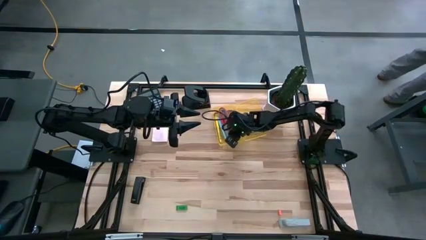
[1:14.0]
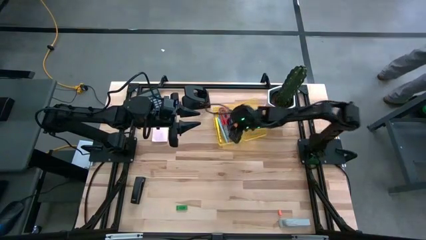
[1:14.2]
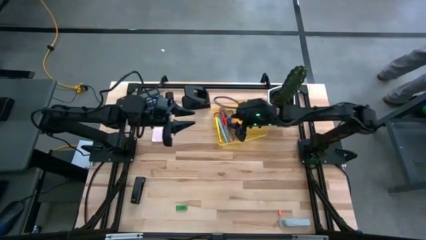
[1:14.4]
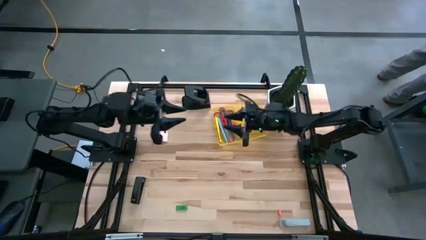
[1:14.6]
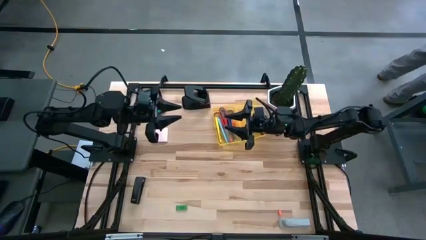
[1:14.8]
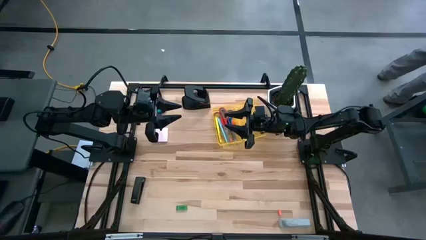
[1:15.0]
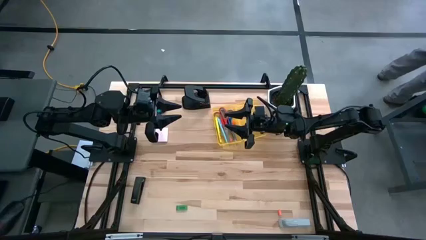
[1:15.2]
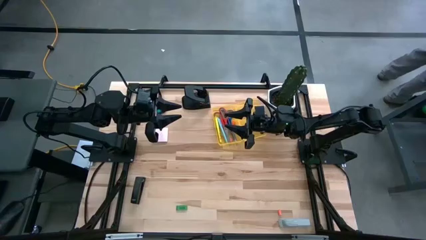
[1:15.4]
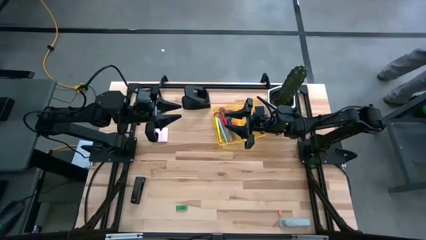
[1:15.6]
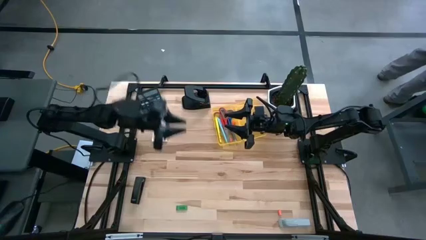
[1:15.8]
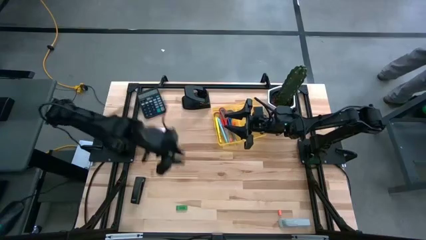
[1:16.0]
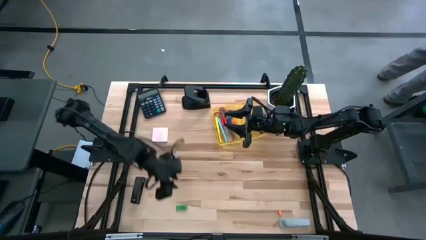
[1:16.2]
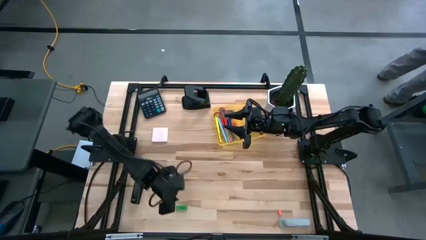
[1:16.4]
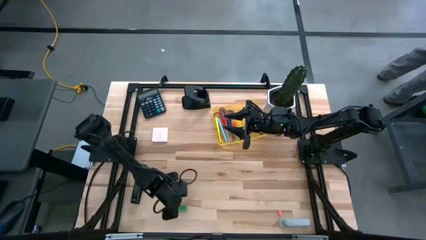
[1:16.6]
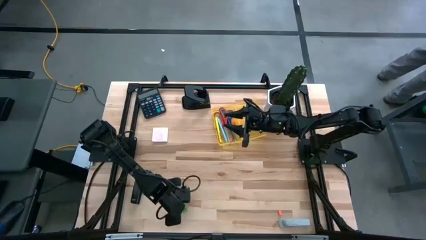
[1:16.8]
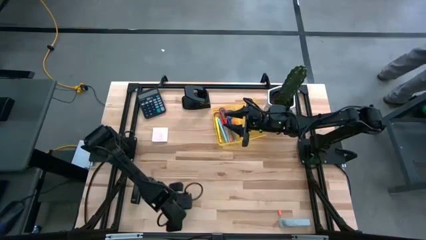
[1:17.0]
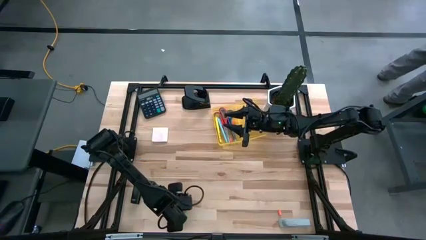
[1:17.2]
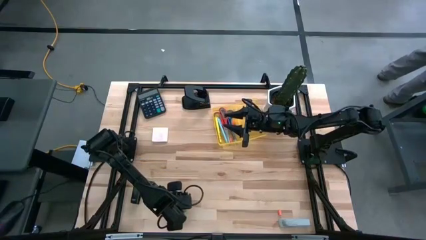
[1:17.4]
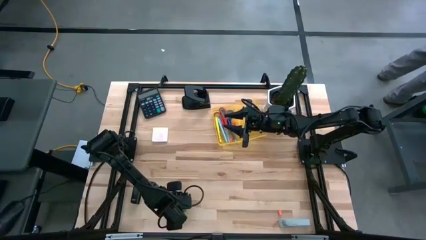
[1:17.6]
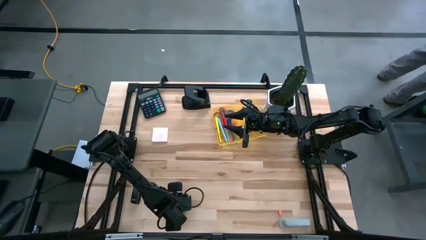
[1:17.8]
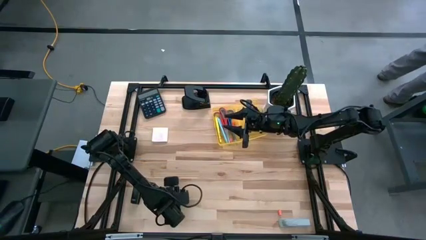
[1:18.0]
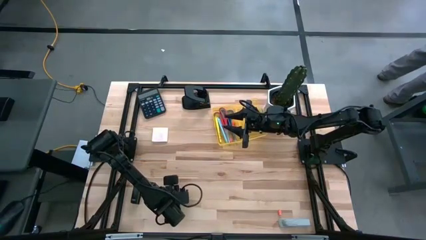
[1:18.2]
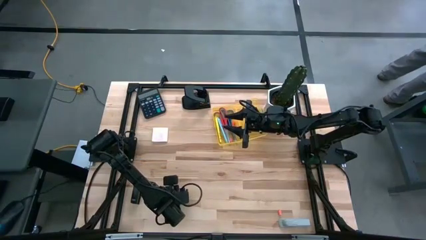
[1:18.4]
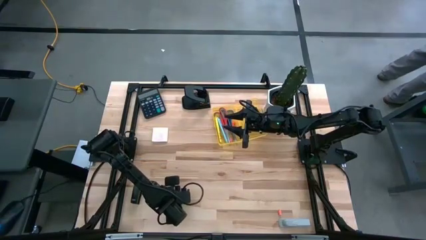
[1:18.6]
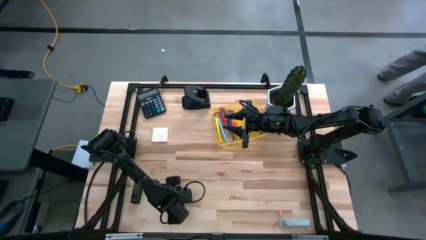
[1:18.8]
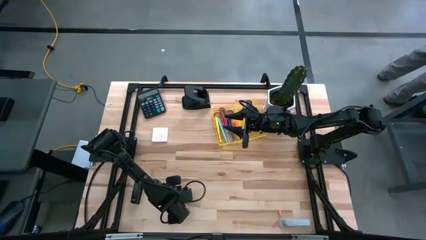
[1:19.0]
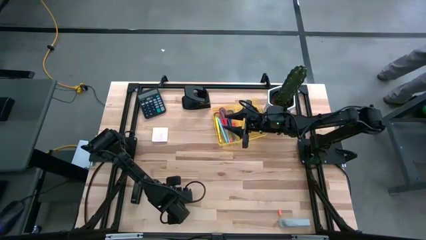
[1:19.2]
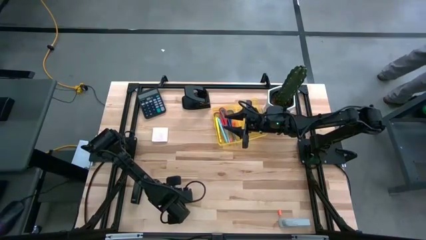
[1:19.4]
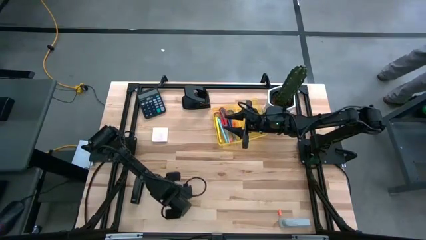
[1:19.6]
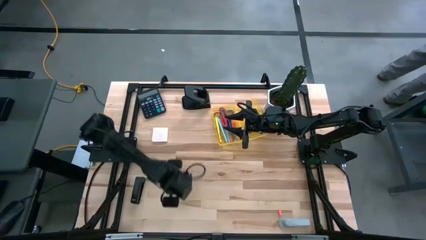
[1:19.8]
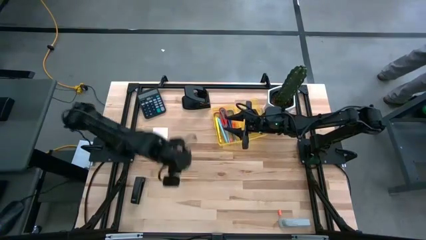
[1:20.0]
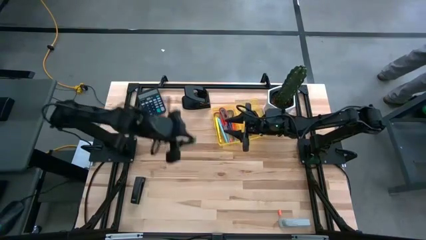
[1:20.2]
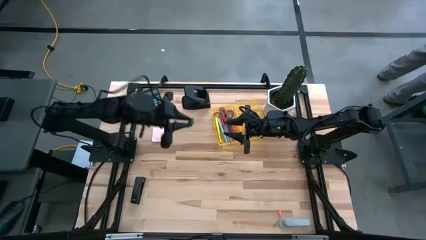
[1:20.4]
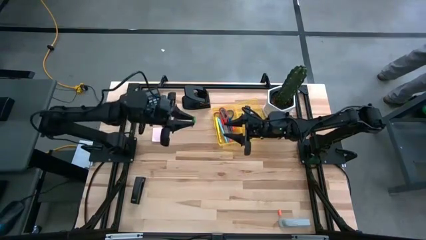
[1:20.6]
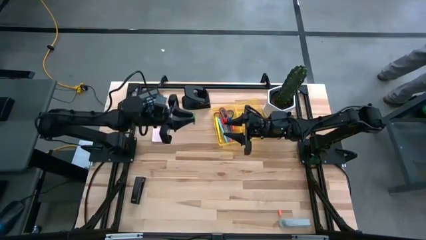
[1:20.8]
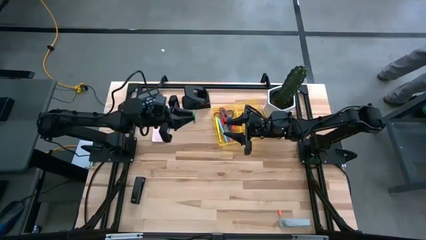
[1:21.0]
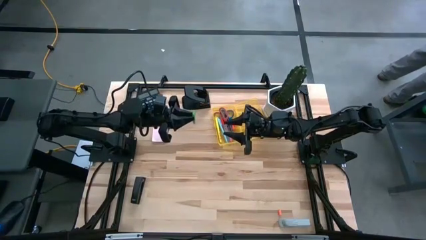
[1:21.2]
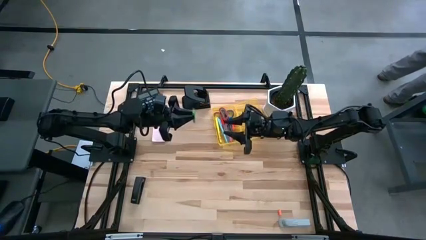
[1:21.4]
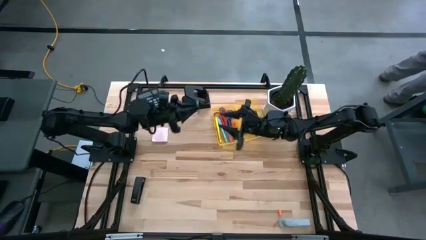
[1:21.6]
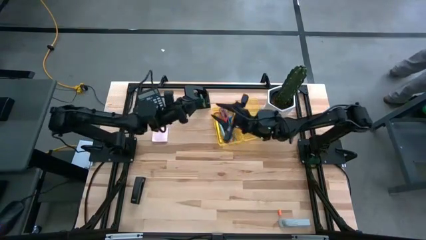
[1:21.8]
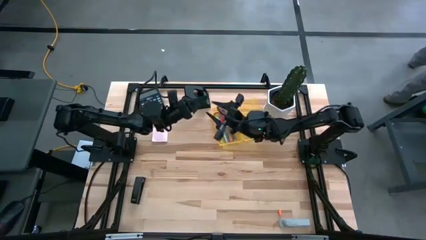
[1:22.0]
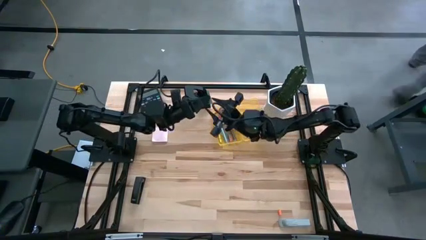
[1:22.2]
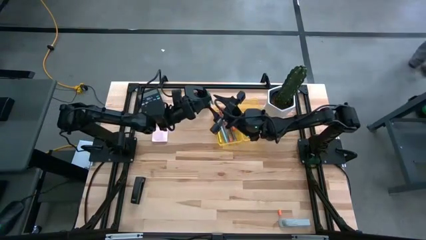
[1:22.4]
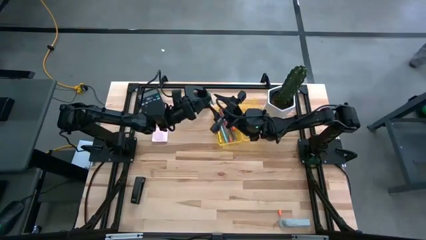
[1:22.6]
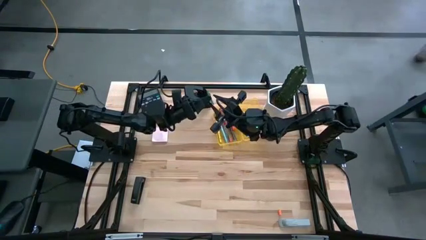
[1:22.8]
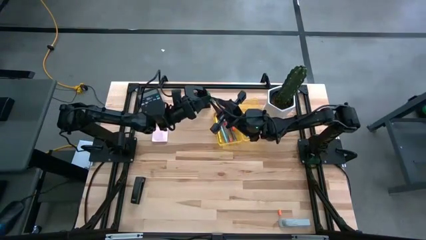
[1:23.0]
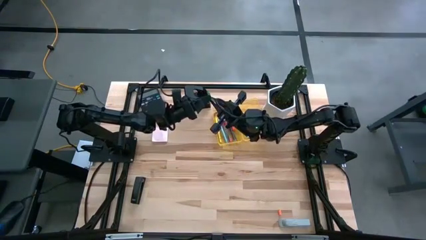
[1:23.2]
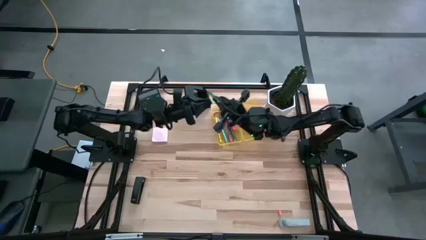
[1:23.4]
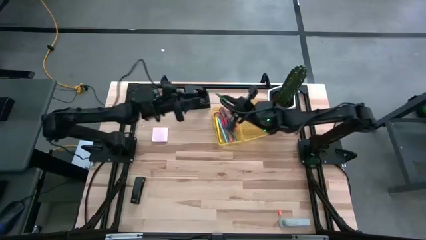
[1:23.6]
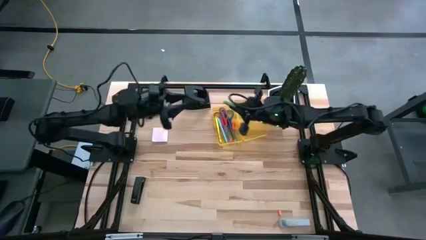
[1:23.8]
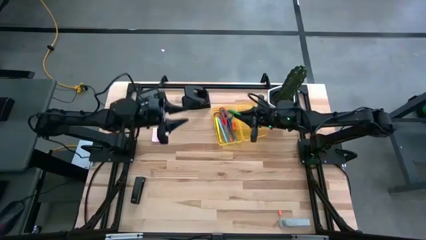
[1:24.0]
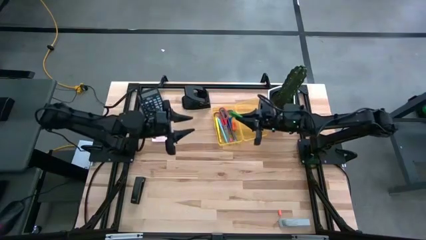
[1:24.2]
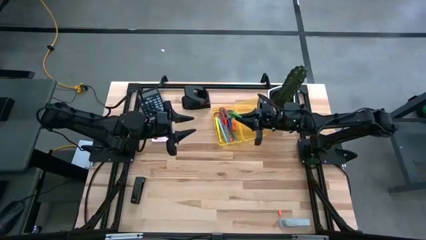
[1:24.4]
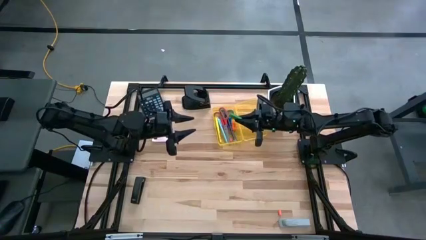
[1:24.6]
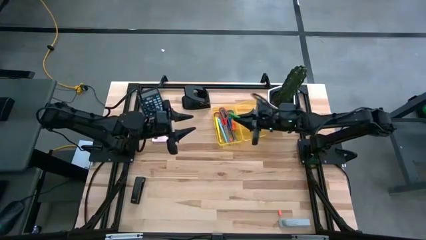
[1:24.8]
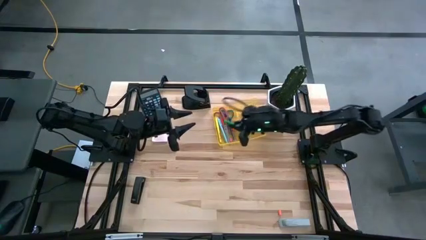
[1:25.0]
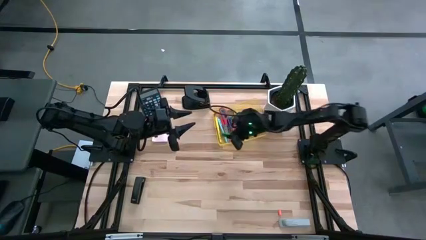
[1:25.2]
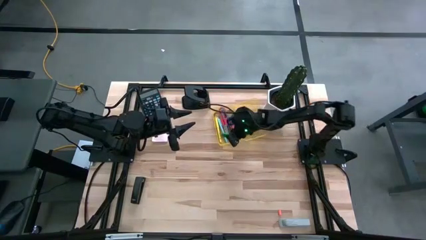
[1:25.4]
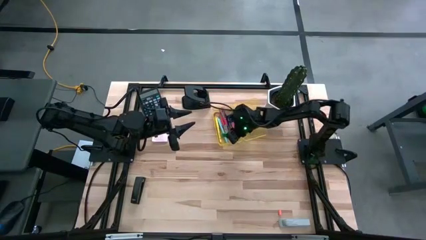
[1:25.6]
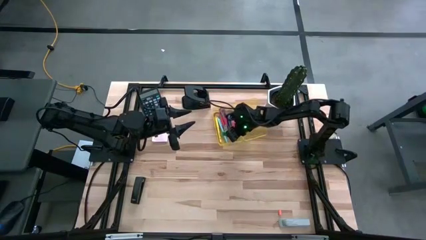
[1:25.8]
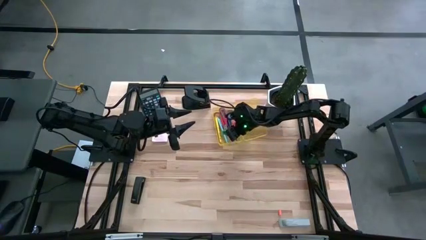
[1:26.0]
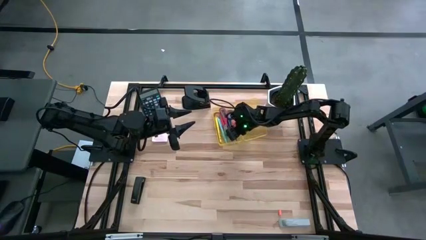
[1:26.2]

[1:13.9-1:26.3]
Task: Pack school essentials
Put the green eraser into the yellow supply box

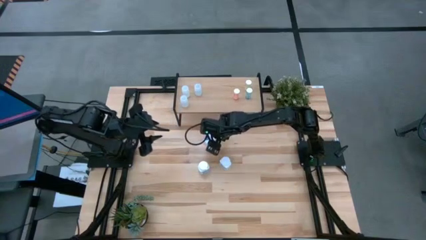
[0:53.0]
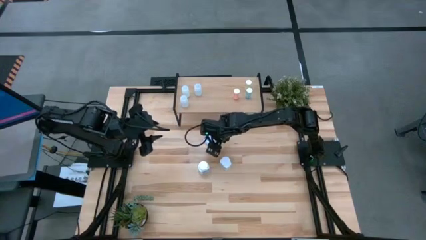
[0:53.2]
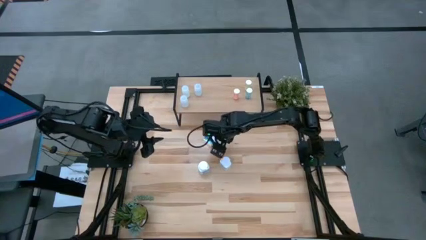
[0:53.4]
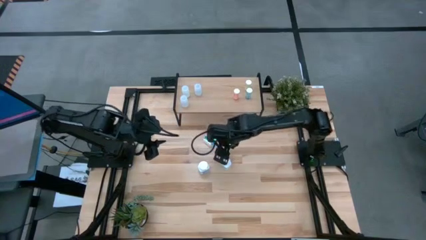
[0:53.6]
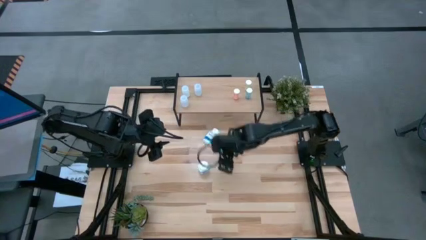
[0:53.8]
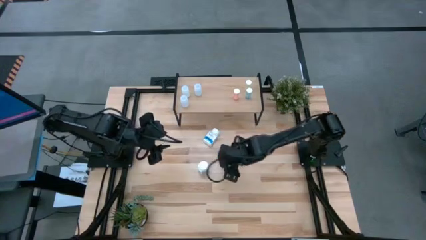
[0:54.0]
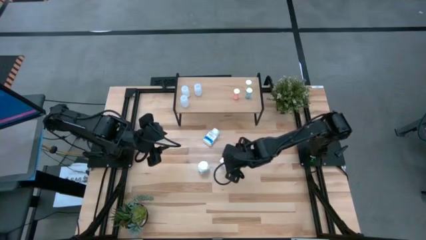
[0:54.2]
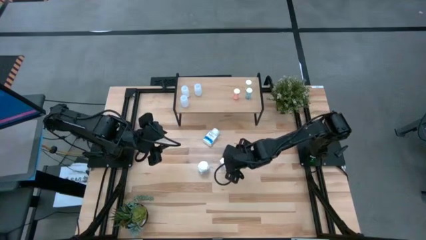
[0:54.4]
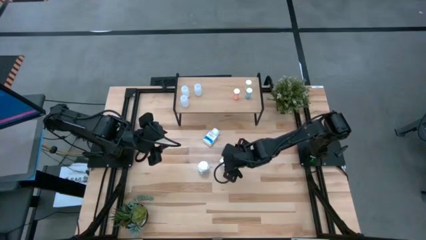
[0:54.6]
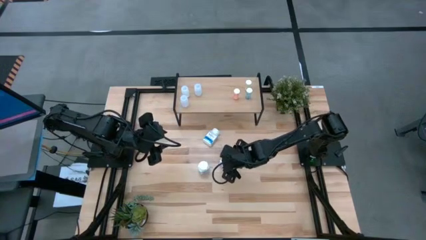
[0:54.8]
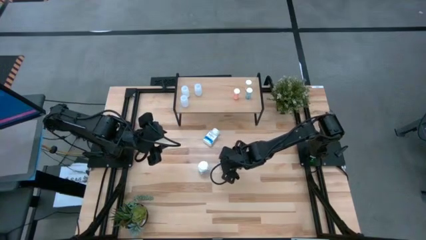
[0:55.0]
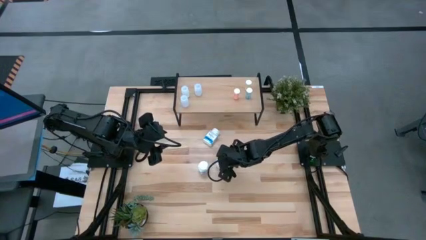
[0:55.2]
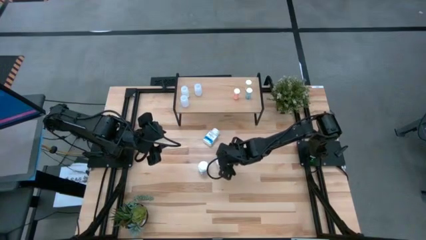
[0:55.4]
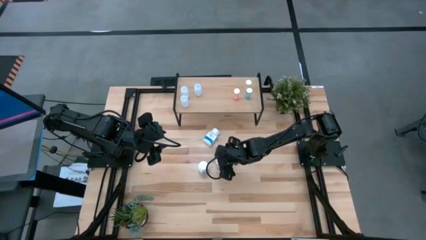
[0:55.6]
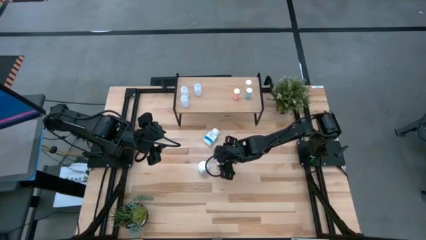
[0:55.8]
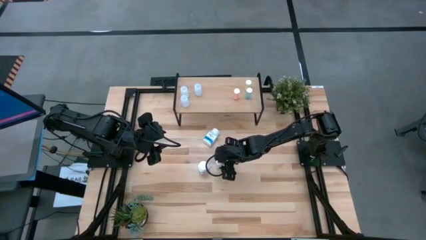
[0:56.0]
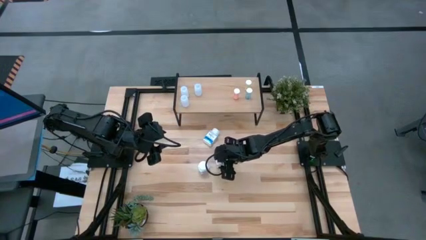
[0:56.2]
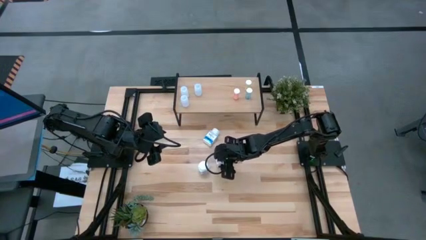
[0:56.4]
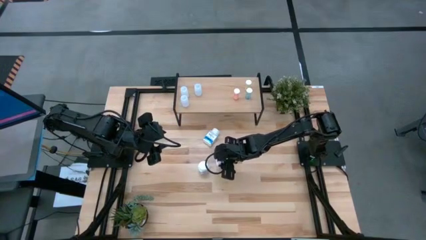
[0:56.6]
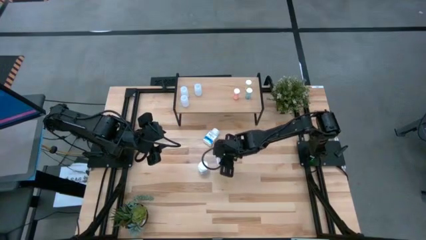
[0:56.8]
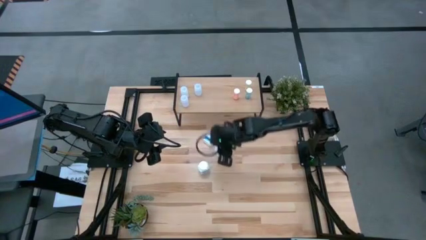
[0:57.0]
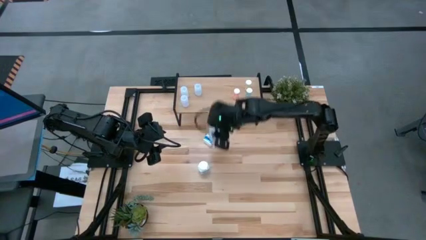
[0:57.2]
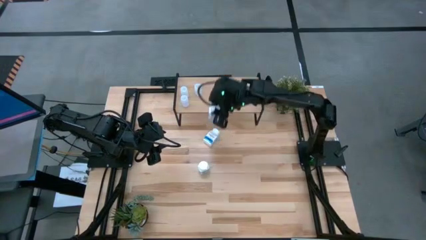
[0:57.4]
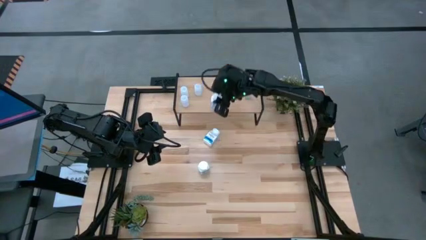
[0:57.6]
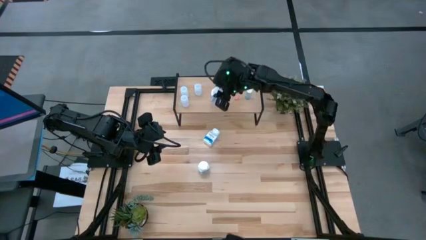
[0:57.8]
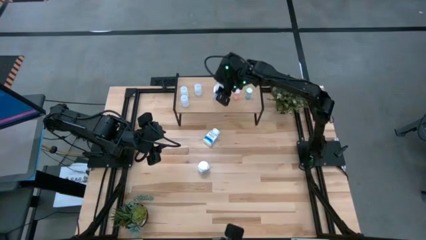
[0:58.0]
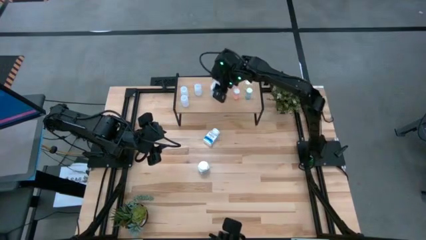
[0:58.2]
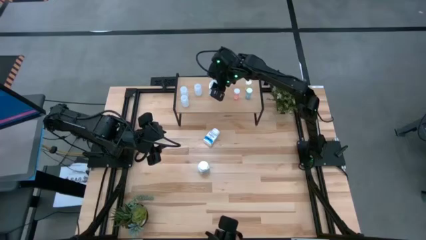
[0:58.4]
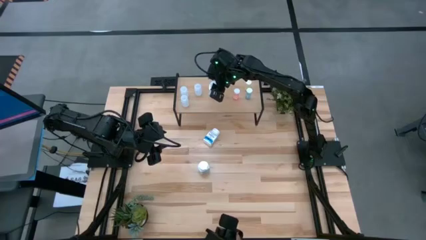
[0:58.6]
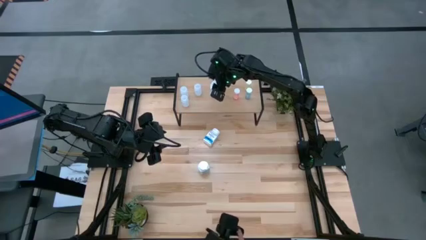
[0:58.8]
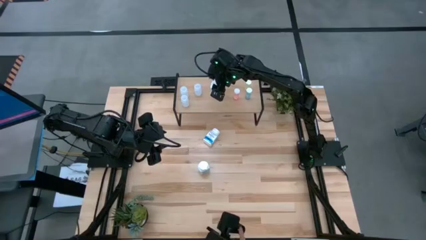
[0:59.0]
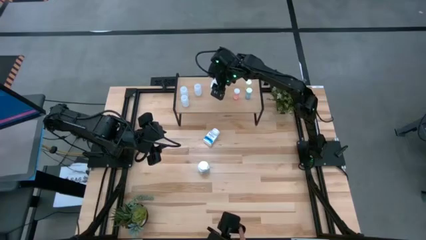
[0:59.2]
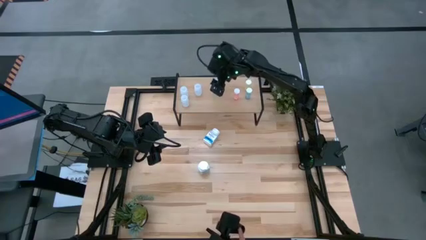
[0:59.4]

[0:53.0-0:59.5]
Task: Pick and place medicine bottles onto shelf by color
Put the bottom right white medicine bottle on the shelf
